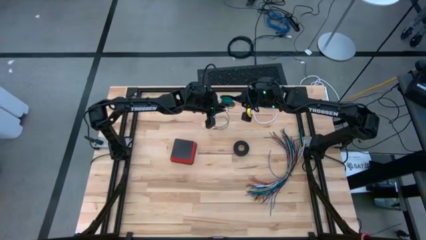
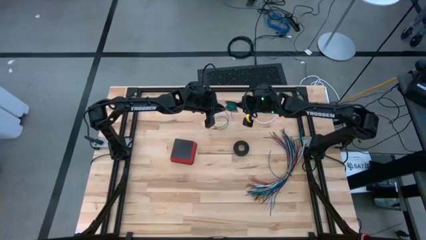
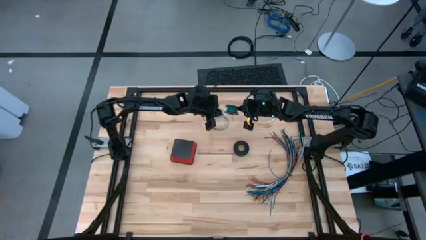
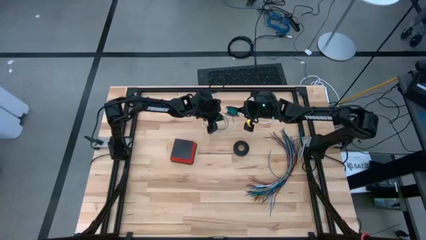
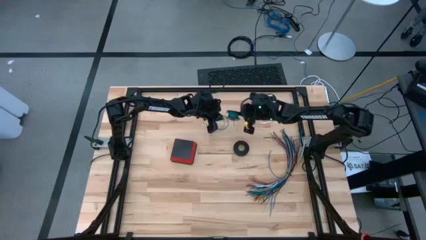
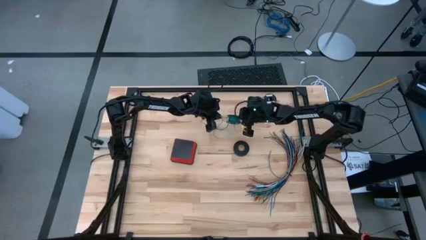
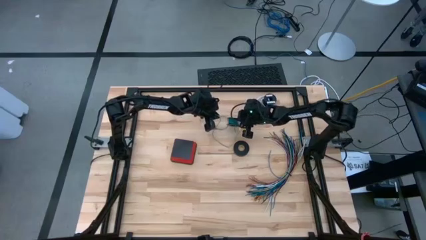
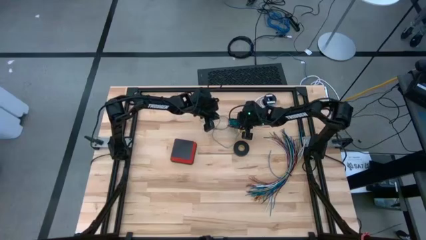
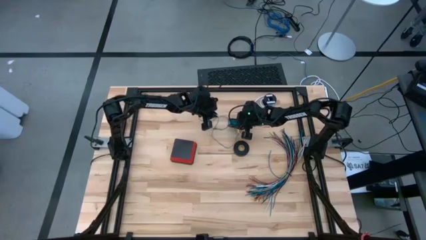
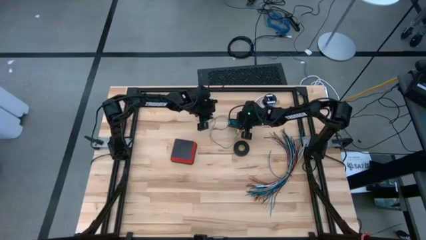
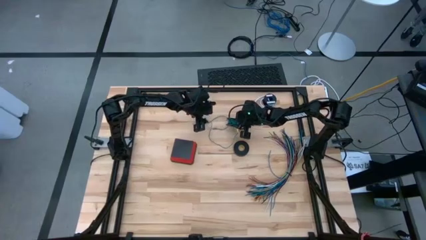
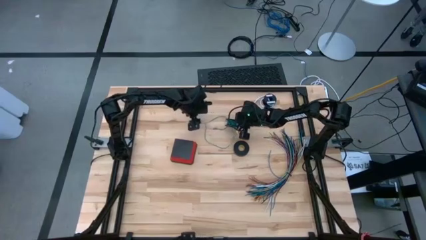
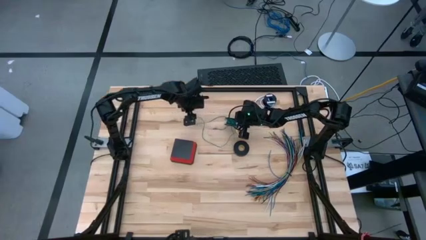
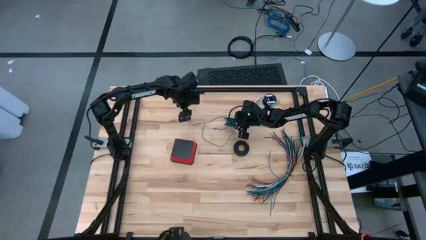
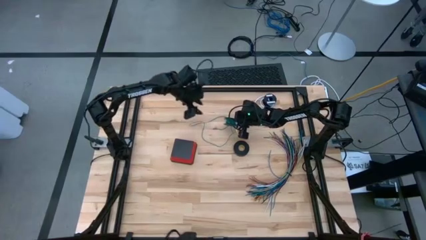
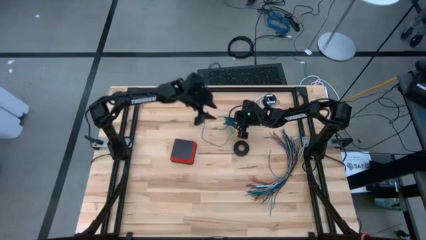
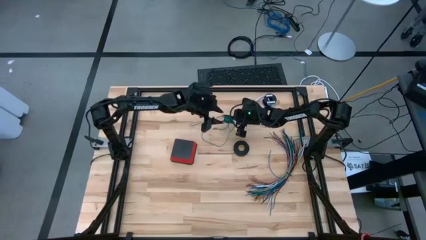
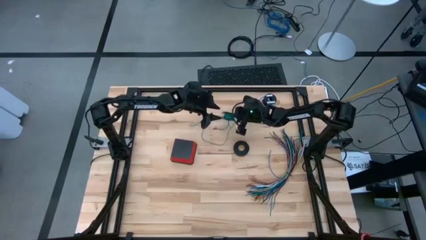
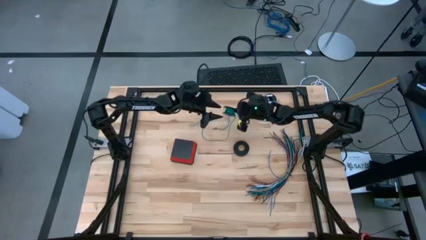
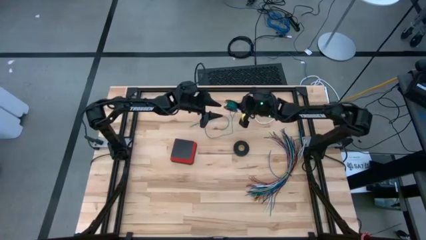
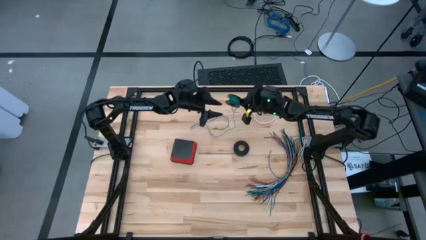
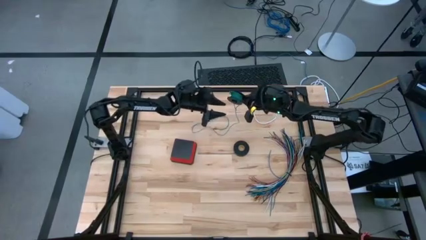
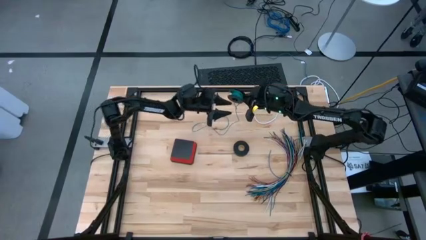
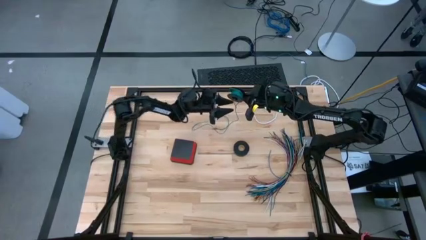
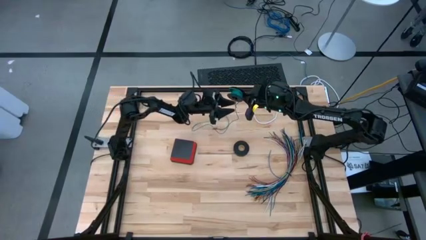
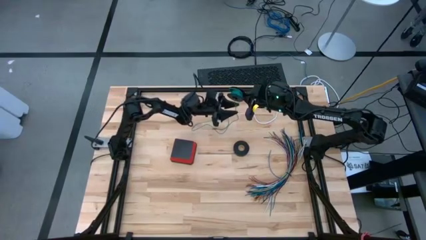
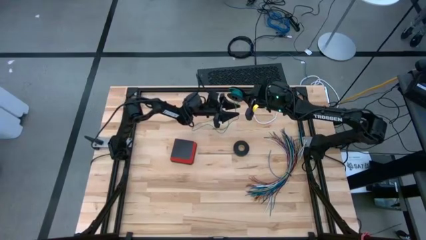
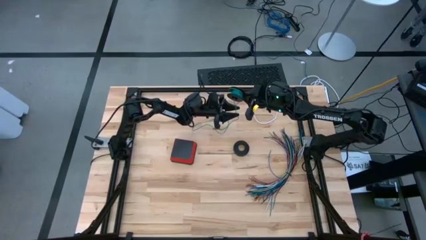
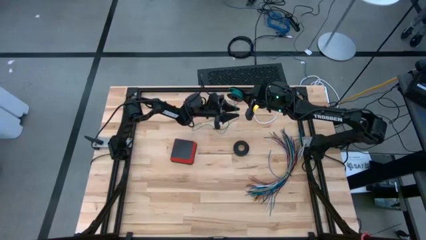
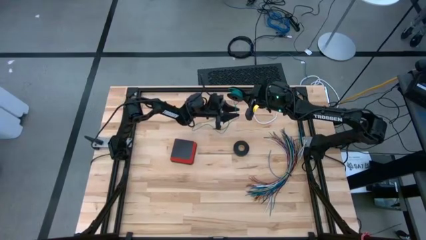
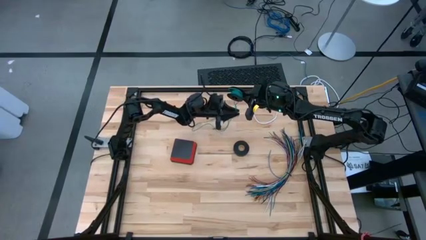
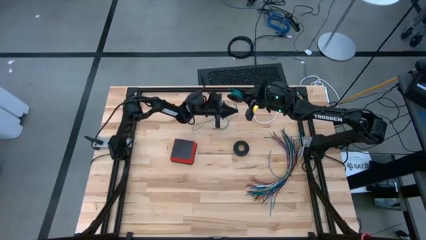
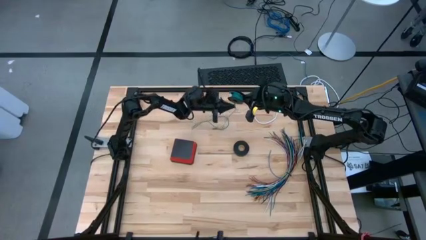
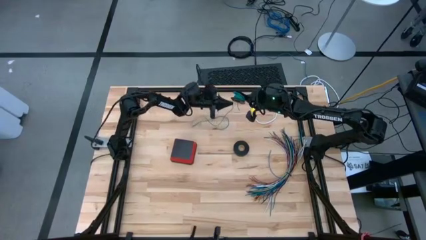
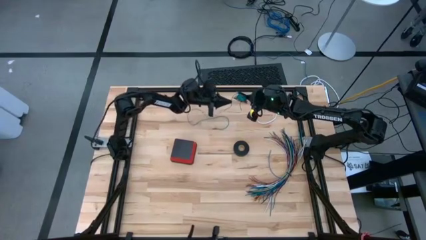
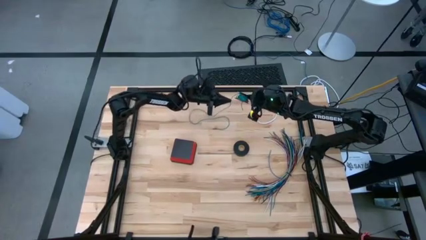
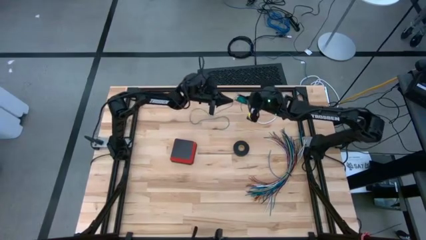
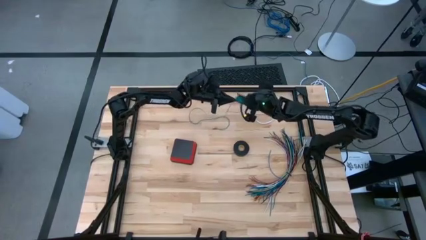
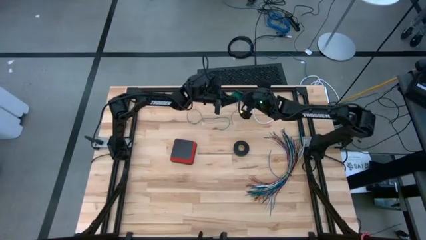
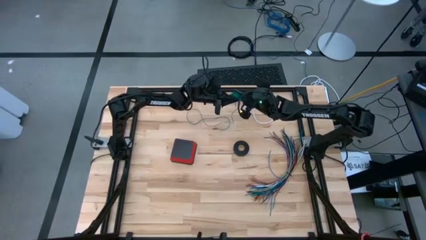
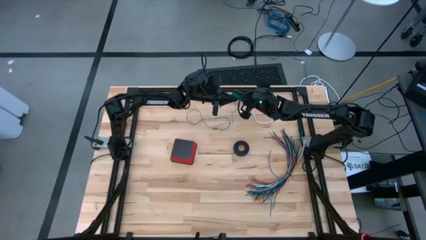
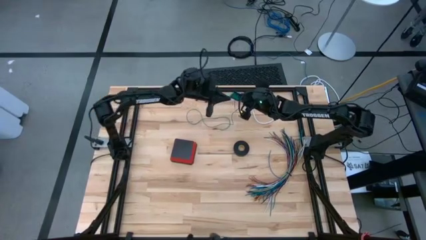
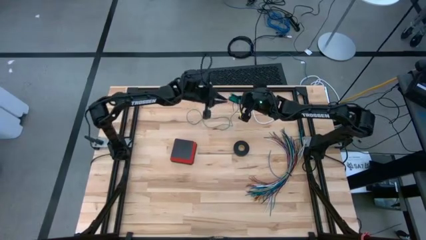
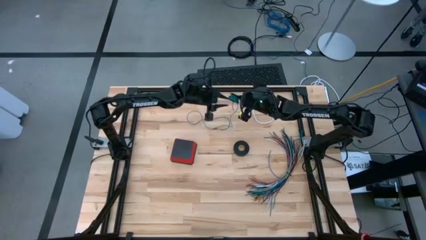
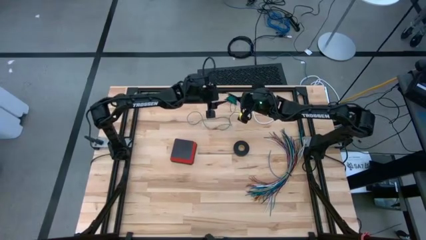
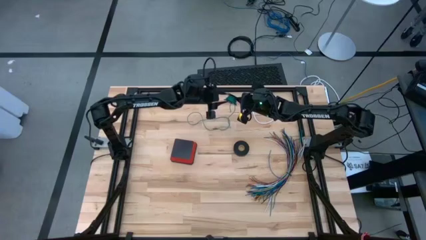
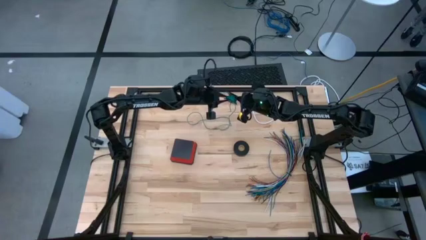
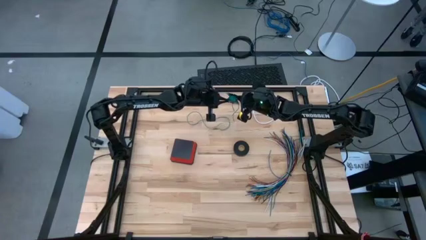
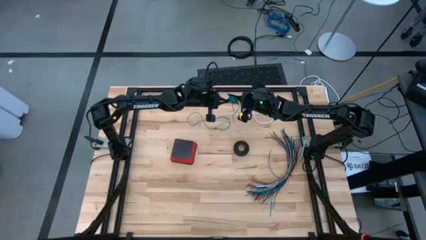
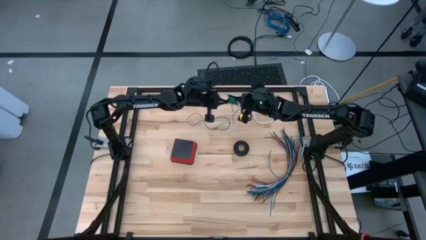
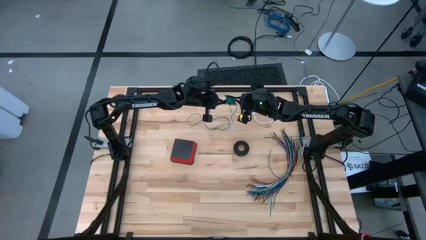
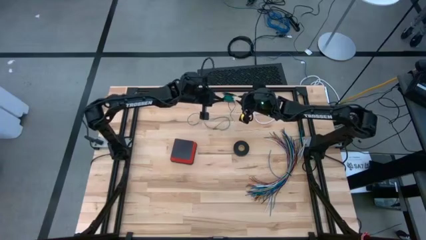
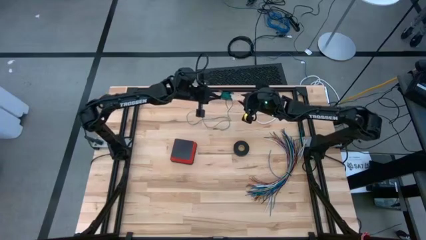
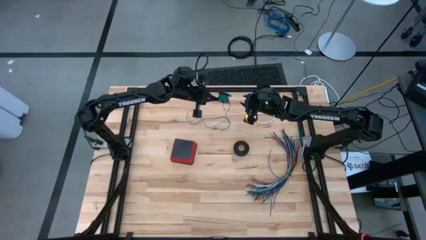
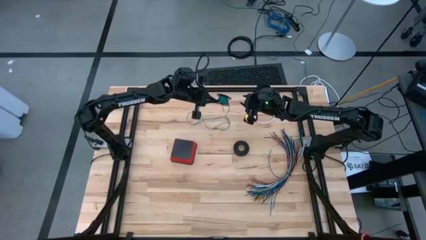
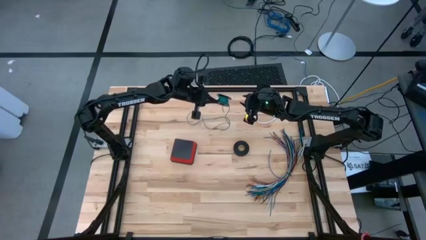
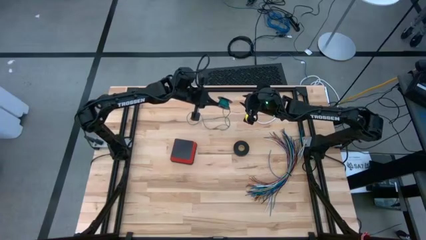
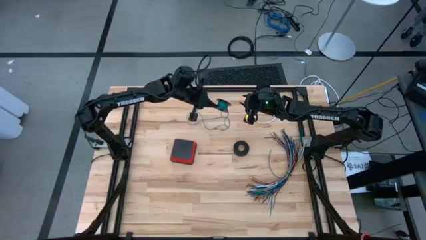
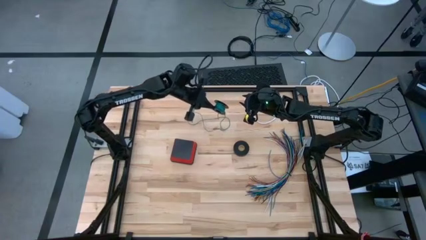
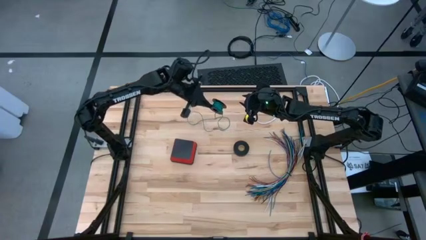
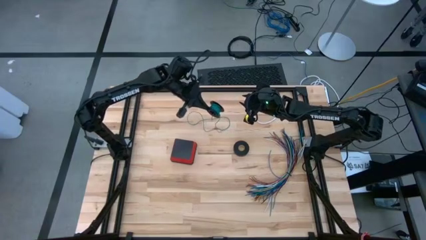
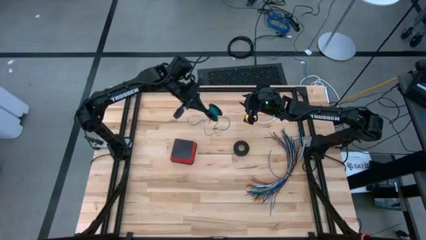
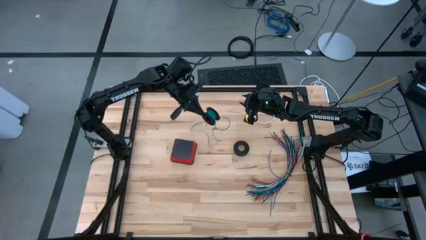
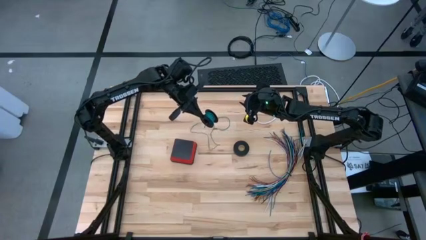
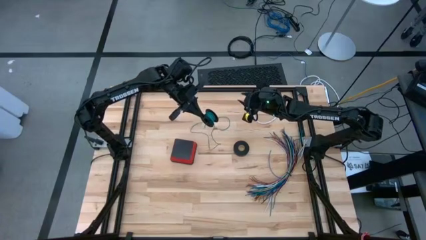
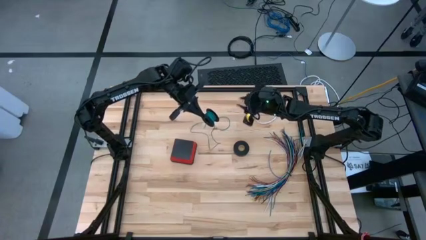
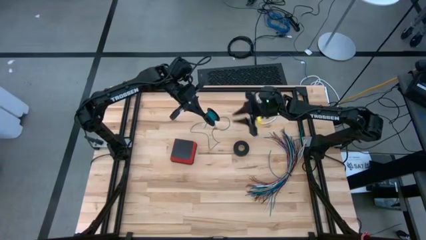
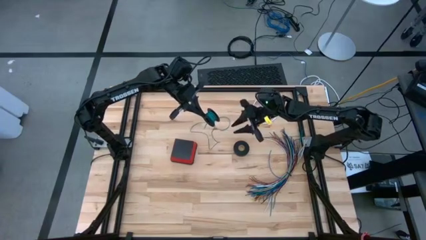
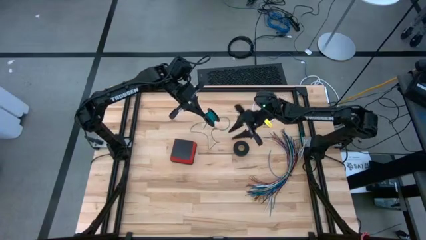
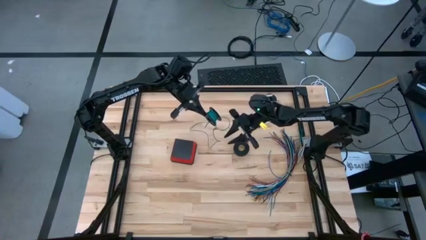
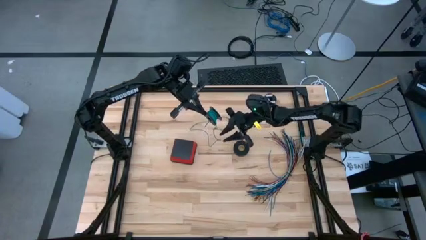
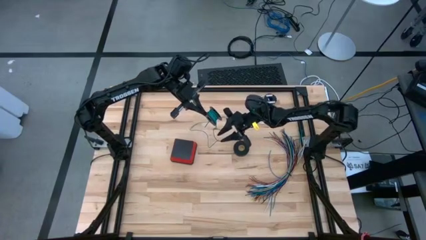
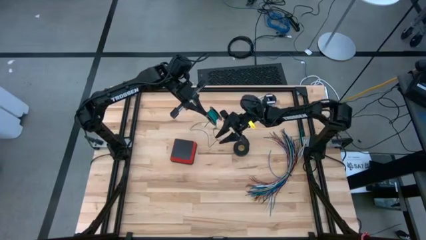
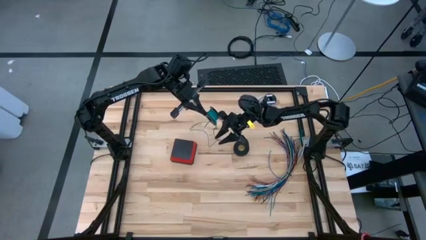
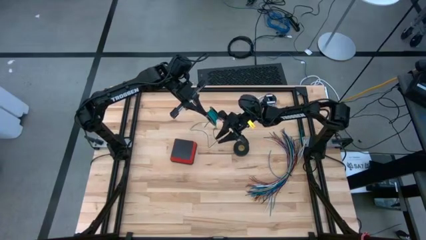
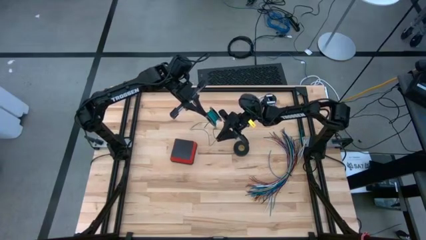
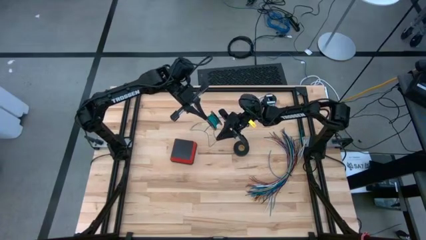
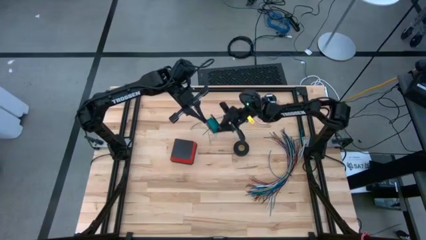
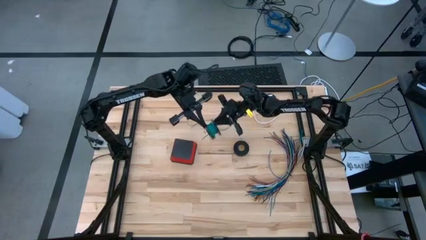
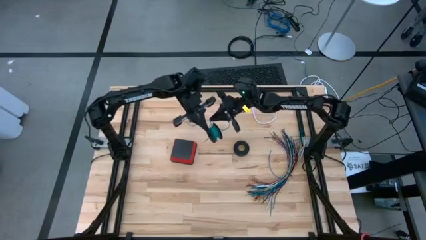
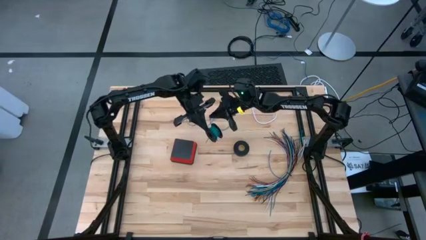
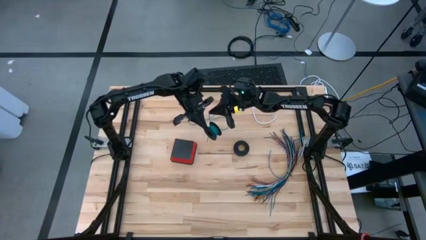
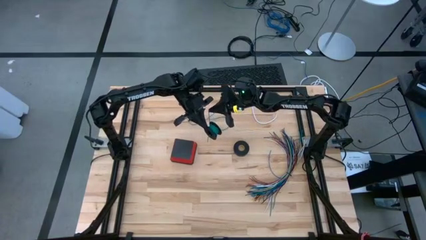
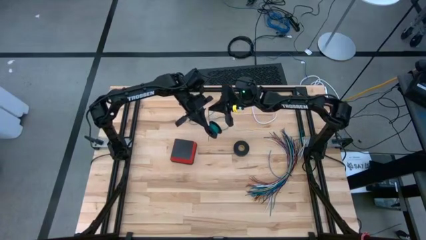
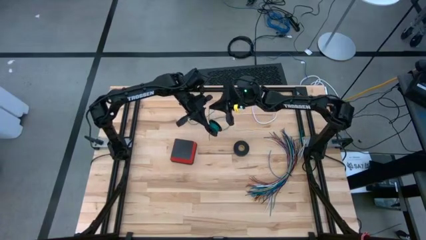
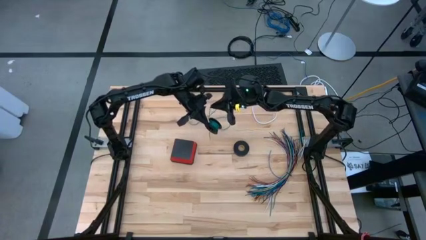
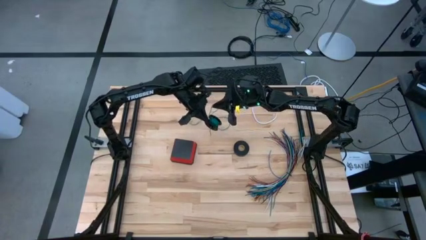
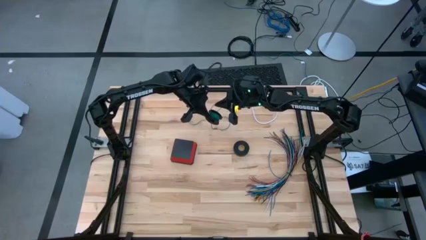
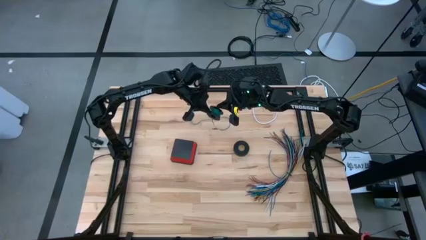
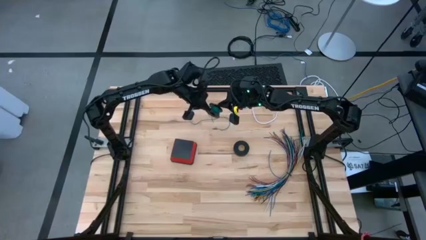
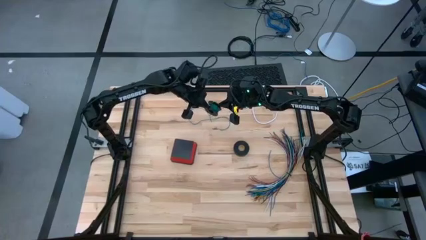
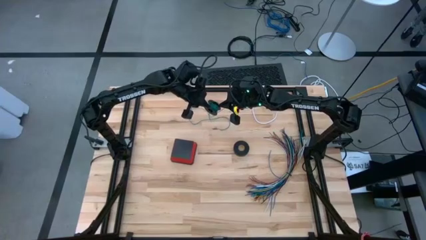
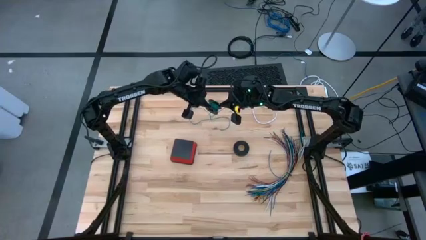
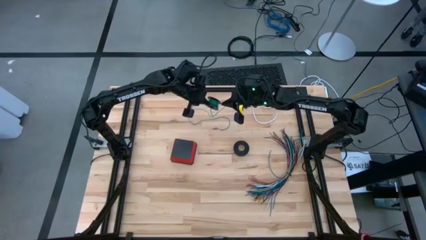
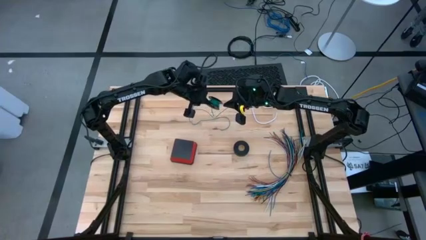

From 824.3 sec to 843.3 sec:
Task: Coiling cords
Coil the green wire cable on the spool
